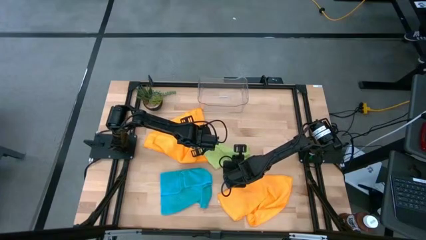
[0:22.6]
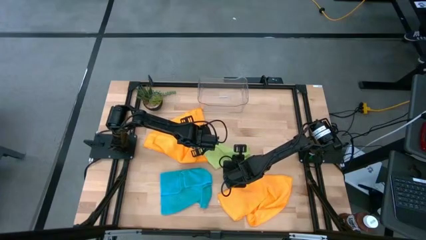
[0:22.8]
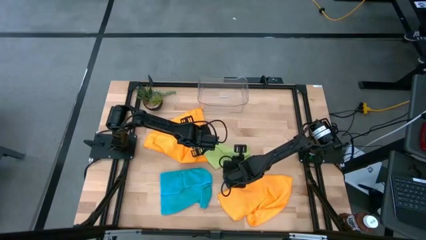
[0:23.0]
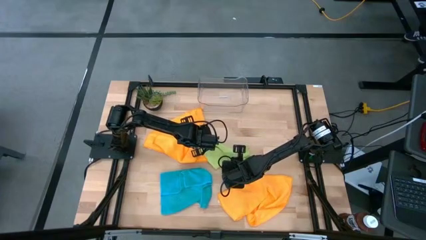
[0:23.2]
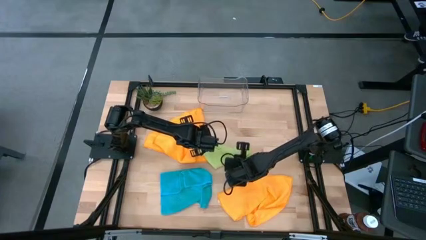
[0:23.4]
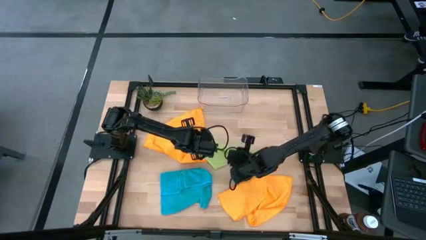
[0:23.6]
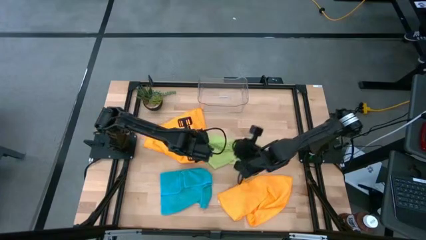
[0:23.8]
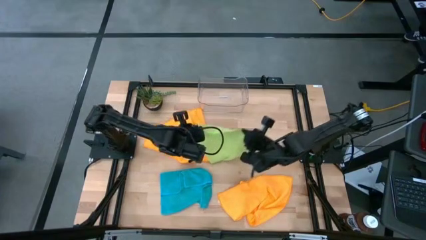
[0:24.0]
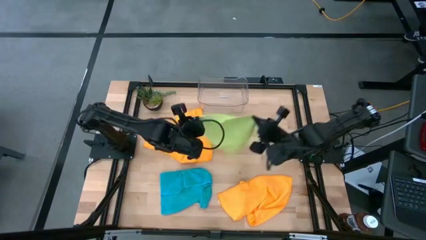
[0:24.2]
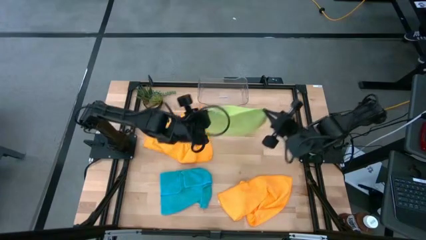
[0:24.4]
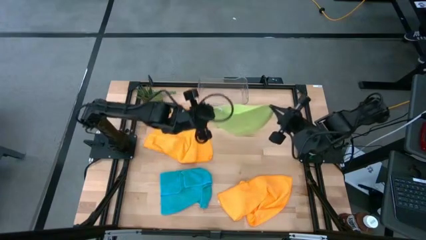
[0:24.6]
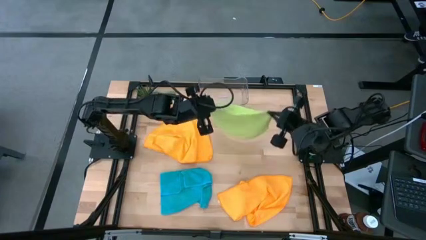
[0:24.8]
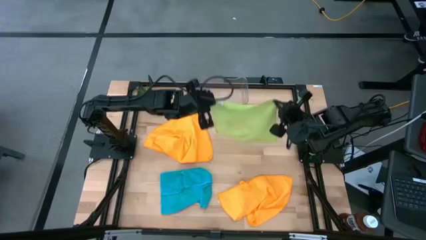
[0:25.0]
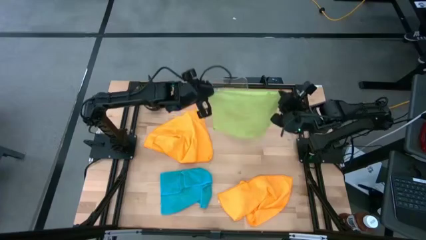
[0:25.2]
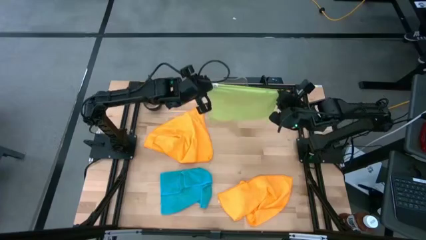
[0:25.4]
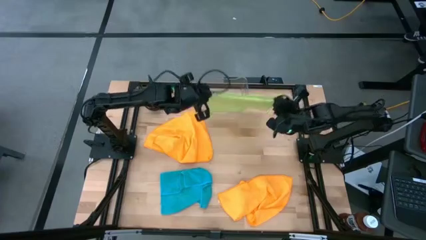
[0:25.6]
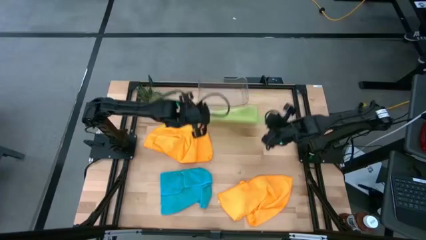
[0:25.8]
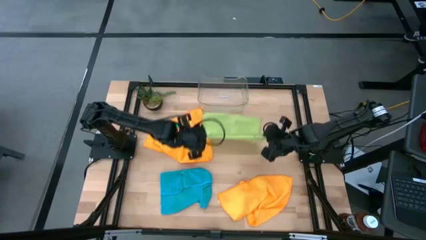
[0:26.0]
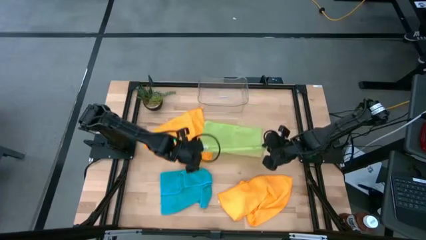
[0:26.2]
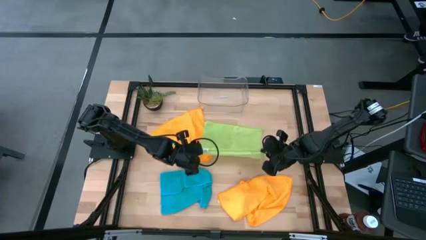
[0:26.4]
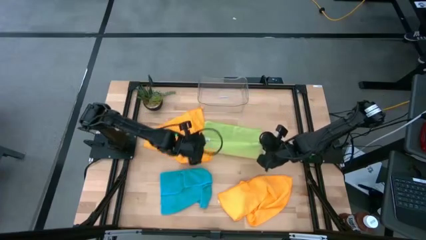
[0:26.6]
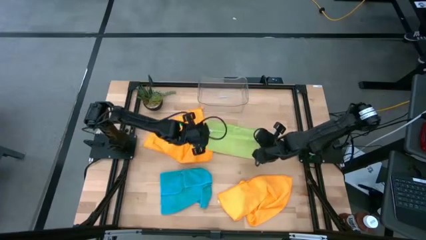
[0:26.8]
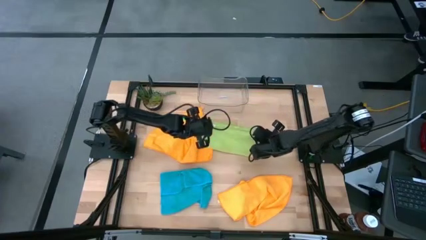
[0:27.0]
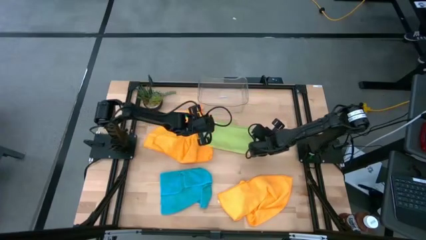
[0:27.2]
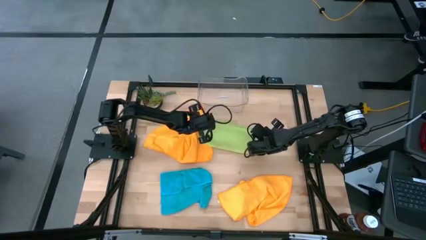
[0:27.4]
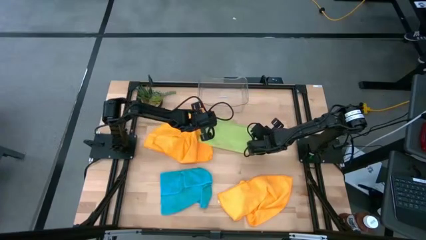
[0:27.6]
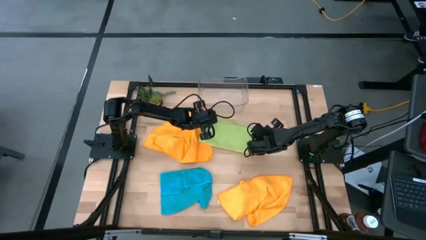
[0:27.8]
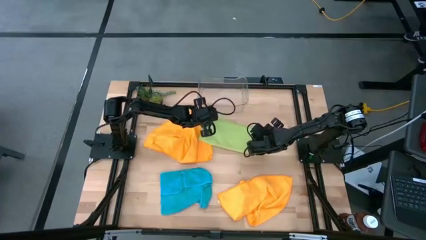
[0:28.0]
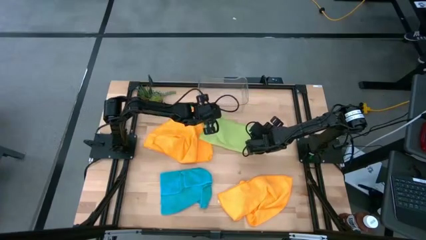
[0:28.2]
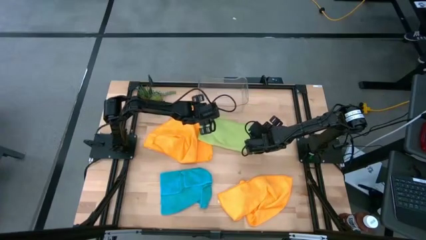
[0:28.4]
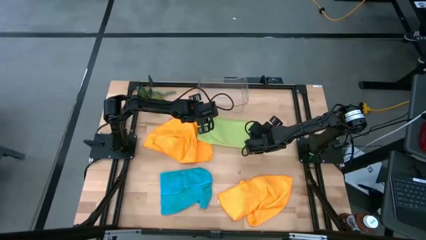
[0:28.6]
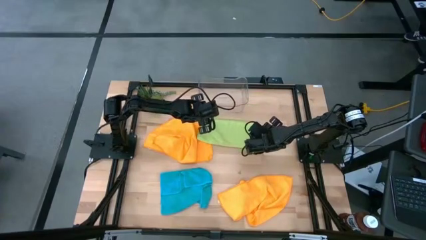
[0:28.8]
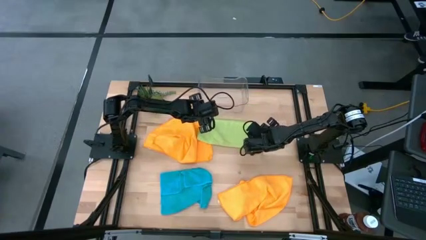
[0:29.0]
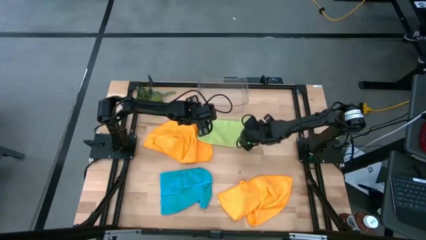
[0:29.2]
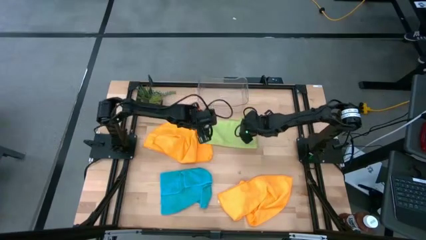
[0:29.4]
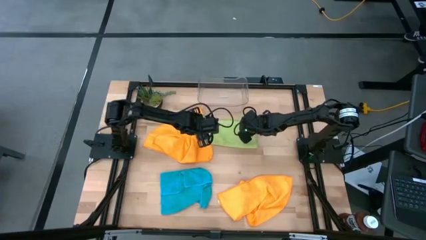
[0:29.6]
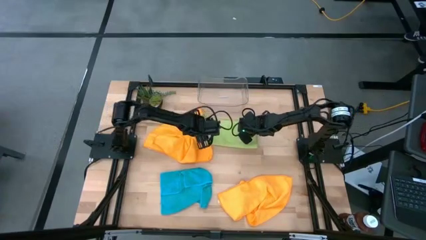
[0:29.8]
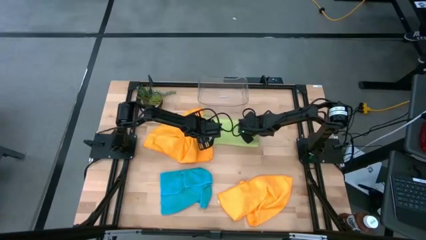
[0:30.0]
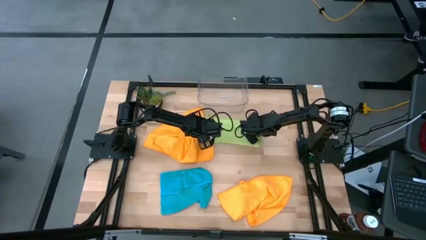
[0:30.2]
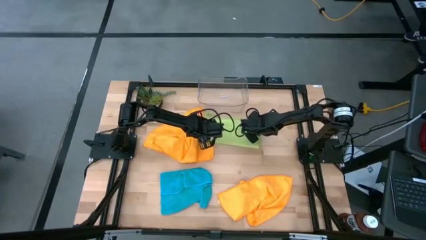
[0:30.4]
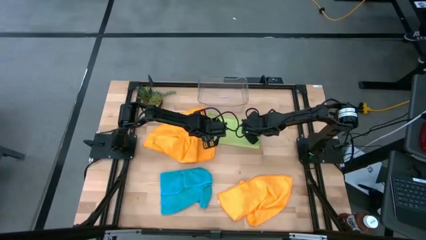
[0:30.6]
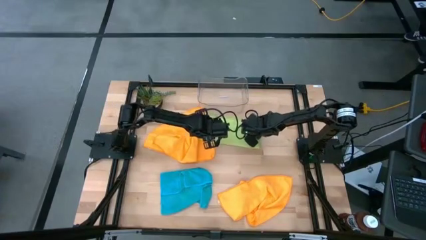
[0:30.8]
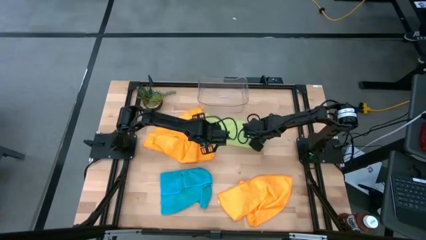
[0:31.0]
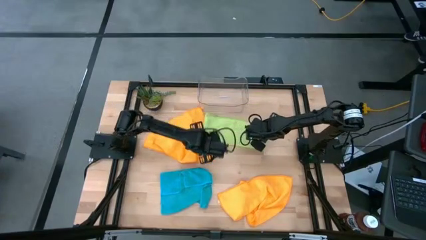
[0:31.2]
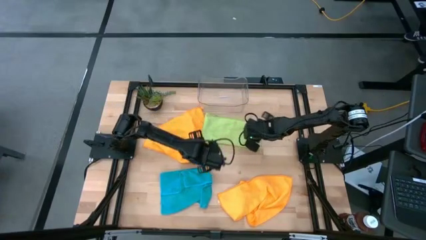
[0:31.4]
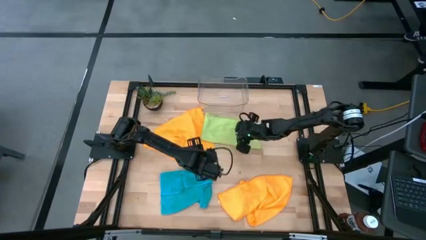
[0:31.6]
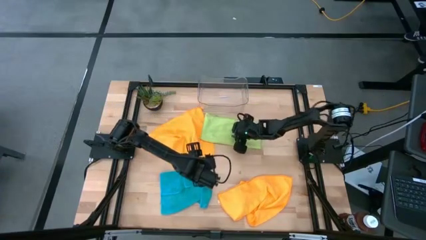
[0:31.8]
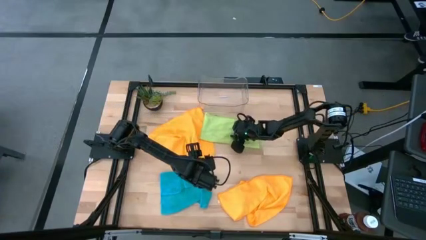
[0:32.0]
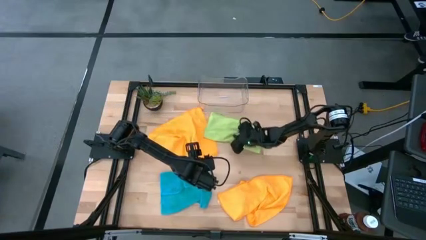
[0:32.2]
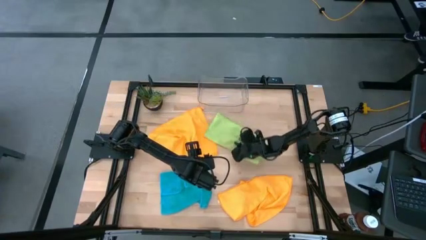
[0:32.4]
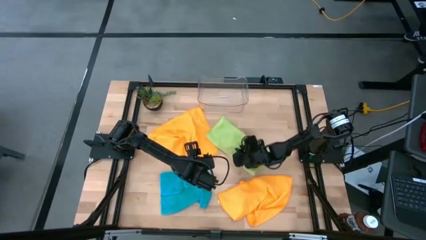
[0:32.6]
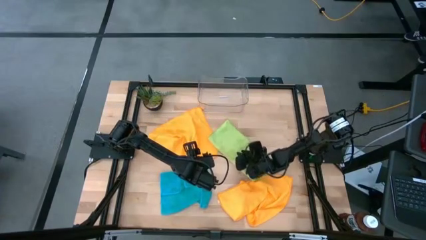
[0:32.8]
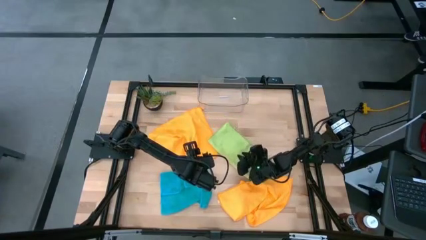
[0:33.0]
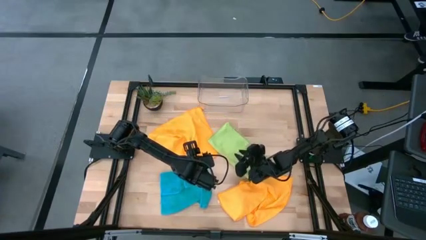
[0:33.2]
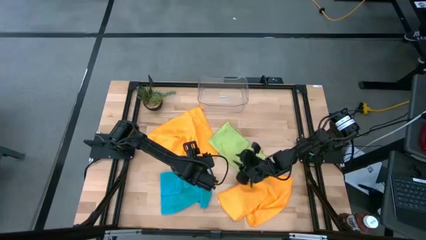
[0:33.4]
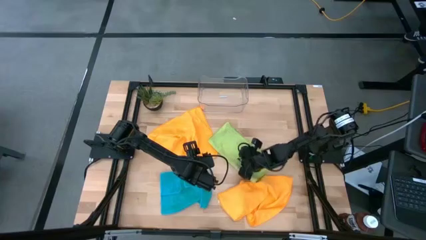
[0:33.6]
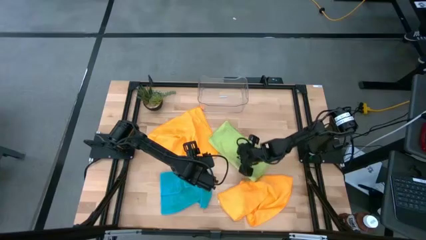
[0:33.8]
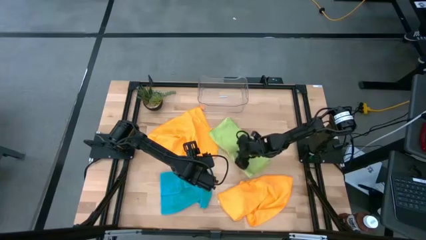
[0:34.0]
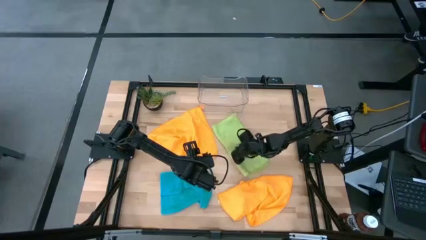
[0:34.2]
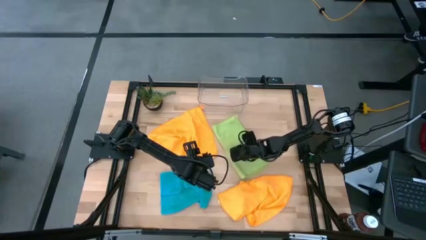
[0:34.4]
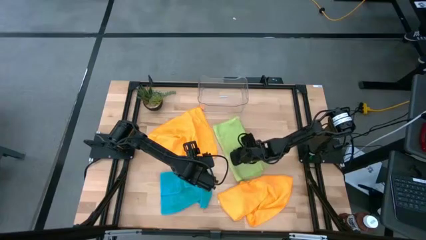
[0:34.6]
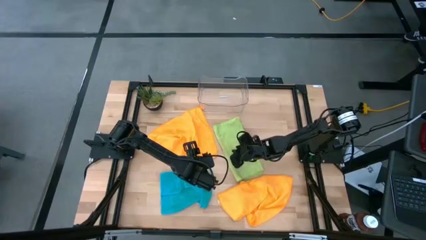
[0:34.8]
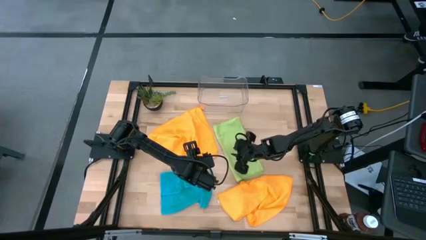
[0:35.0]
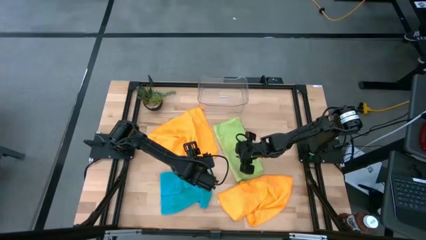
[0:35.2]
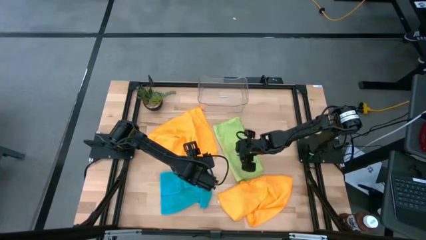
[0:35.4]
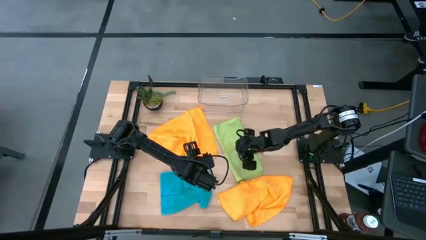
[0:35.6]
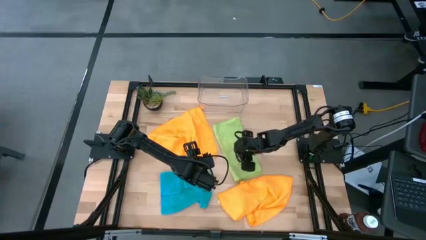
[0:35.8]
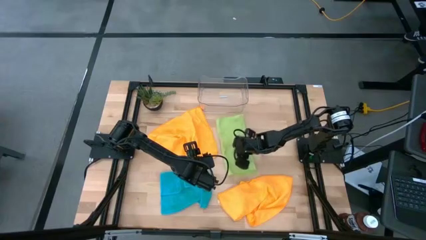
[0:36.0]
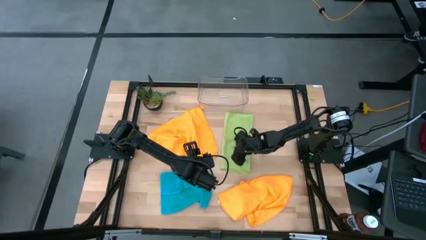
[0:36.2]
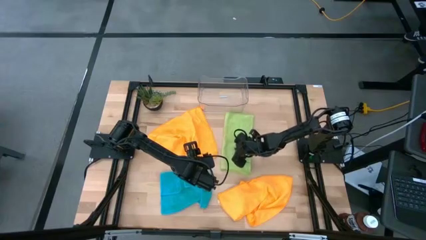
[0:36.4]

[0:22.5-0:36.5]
Task: Fold microfiber towels
Fold the green microfiber cloth

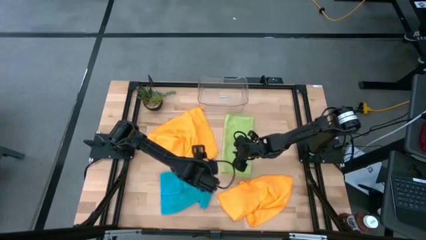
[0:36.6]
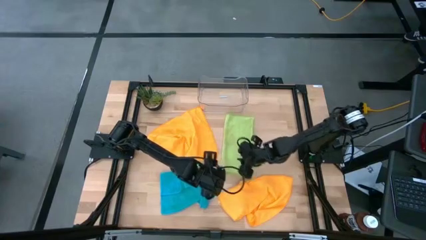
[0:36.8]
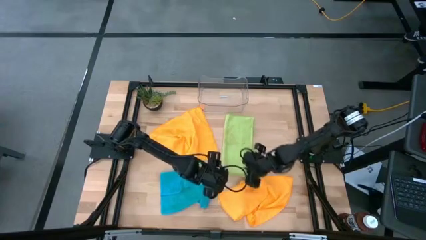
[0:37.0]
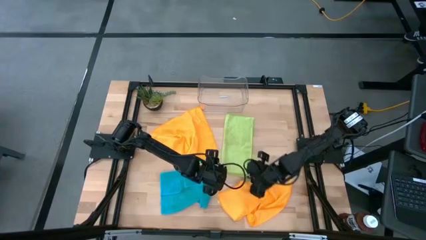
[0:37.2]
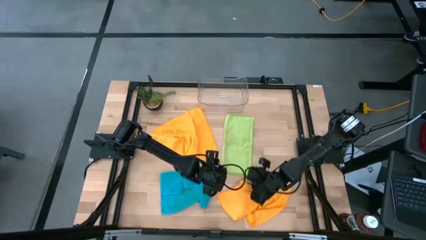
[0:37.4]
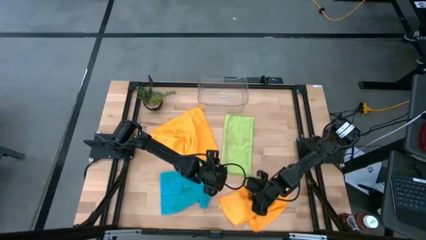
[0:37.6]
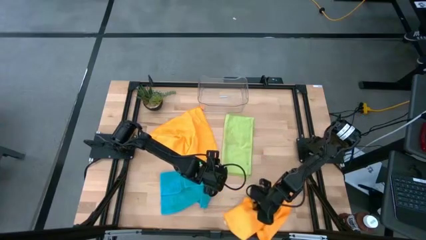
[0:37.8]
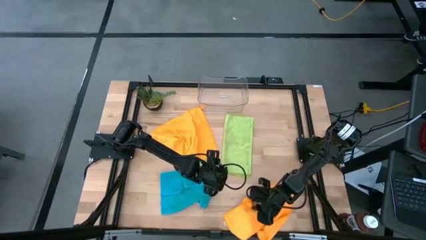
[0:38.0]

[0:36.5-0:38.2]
Adjust the yellow microfiber cloth
